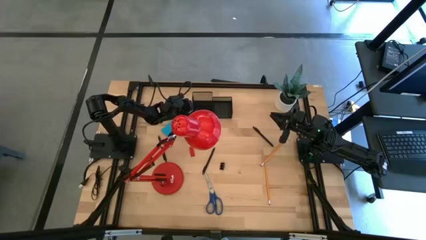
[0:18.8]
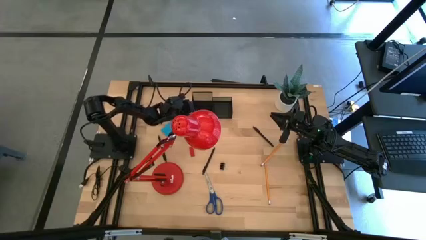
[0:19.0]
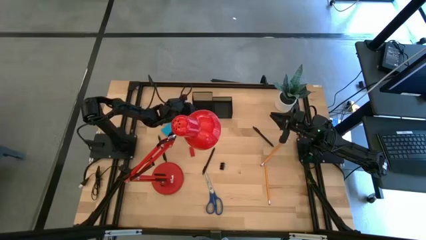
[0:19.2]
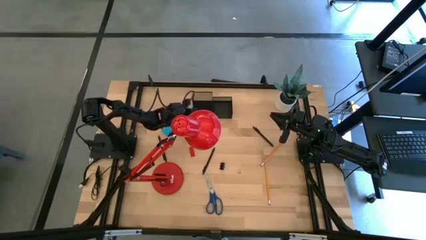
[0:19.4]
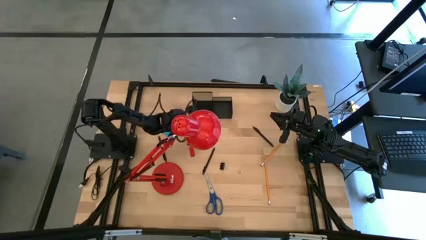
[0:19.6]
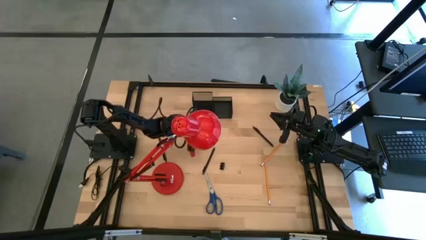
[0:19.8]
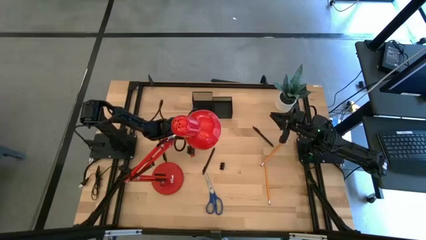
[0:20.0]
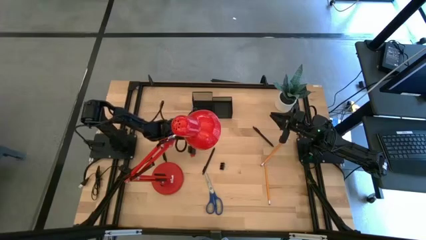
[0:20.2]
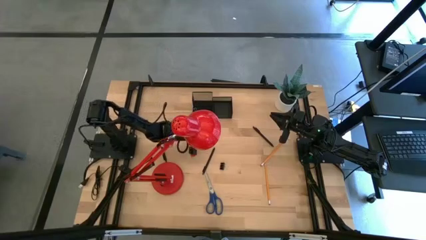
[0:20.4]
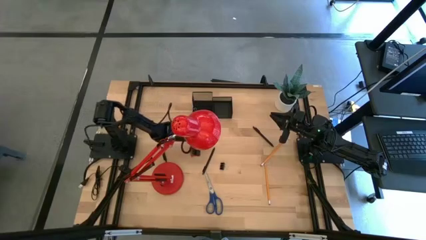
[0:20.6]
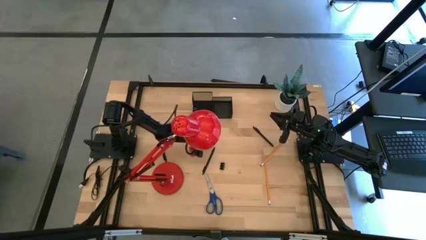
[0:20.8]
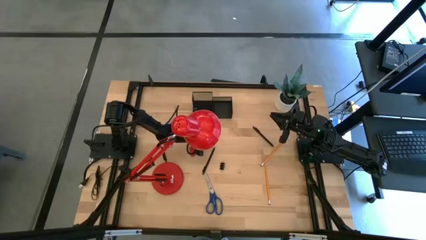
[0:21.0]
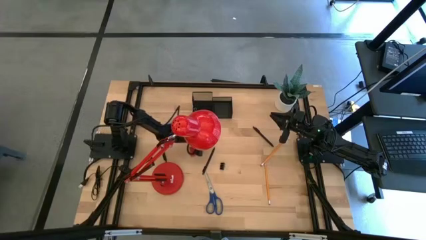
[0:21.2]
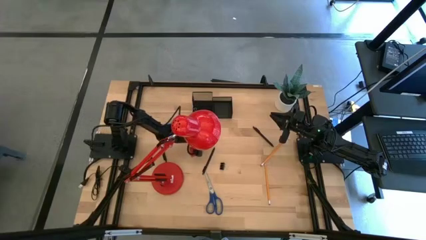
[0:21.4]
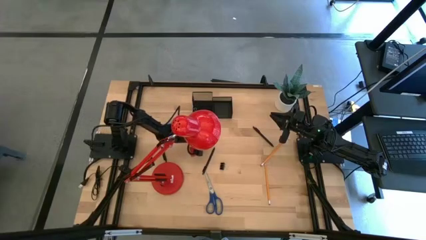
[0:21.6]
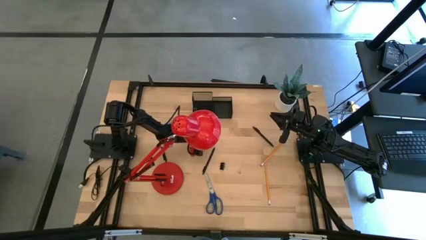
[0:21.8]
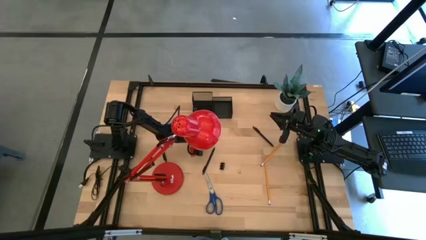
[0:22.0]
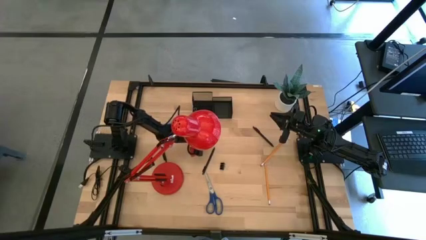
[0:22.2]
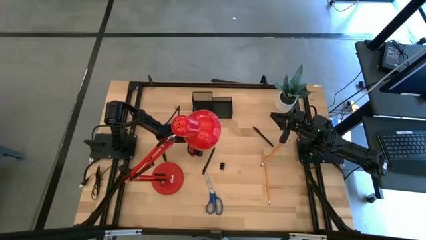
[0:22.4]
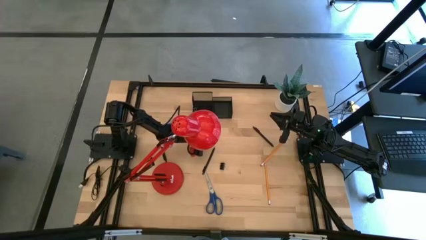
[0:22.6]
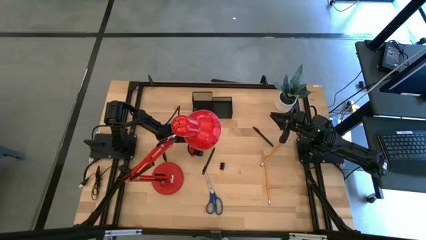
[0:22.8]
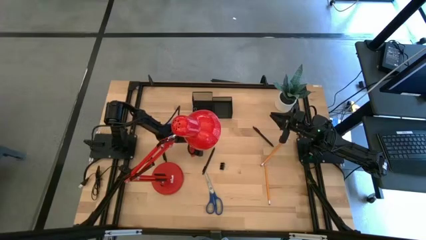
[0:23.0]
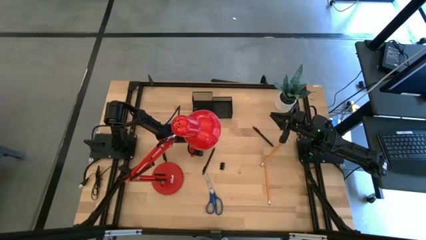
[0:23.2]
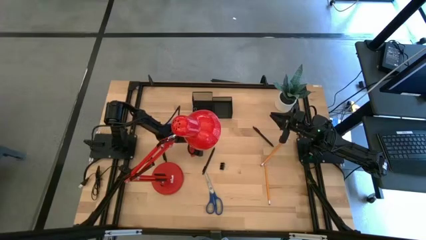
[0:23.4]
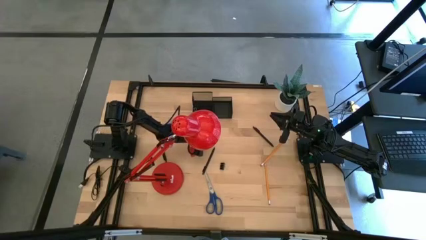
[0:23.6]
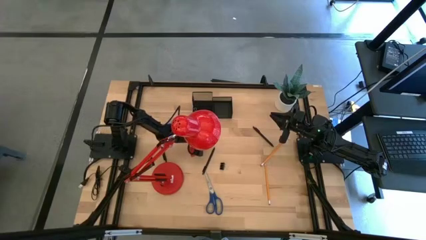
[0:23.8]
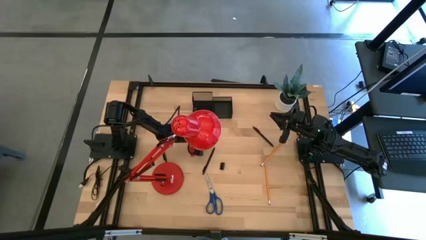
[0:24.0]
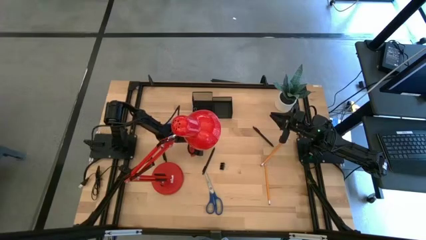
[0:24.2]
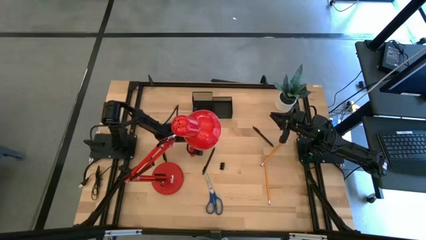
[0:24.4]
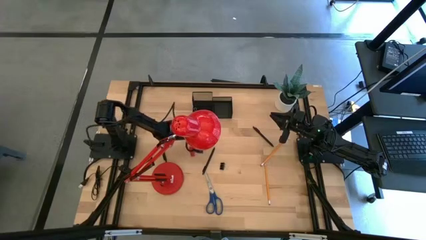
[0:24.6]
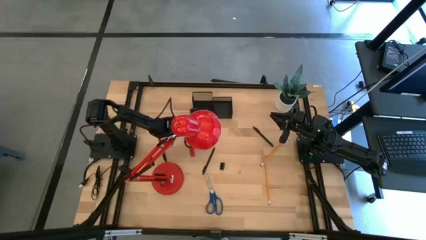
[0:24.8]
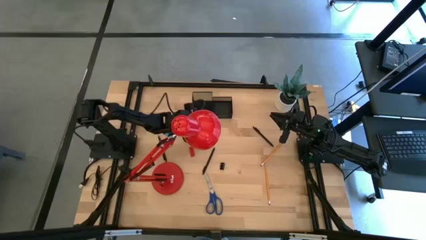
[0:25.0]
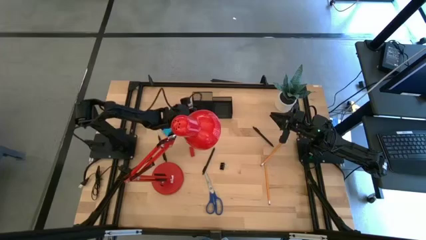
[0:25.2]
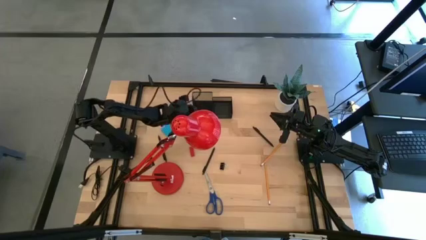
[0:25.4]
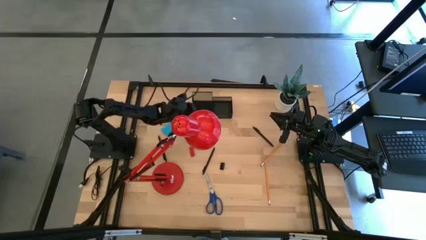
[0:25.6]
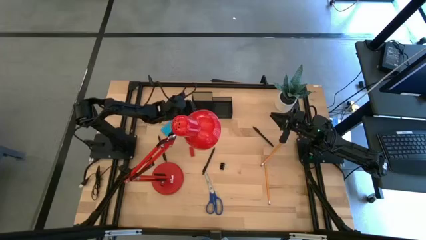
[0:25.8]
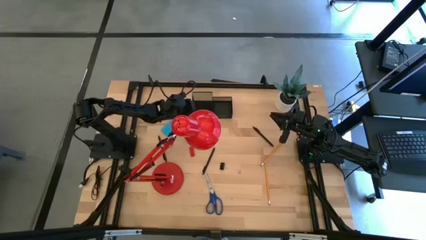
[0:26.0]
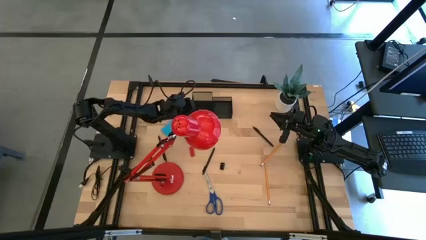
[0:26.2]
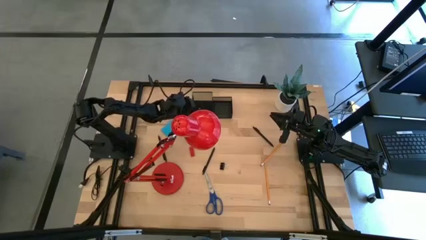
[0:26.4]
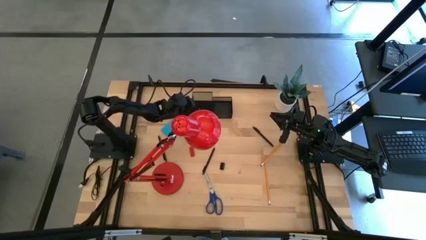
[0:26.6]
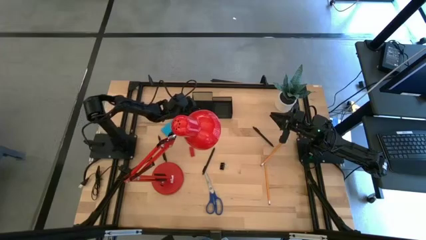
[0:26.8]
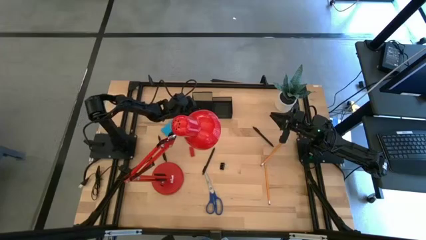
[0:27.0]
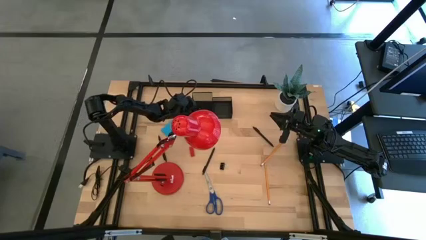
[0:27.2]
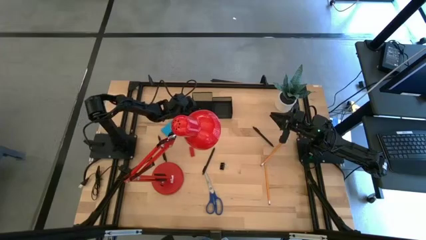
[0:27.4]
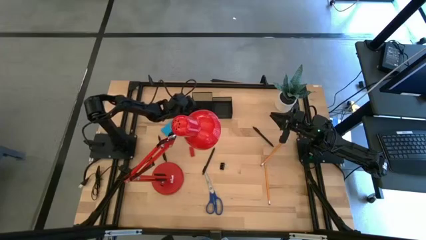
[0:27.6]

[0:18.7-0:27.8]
Task: Pick and place office supplies into organizer
Put the top binder clip into the desk organizer
